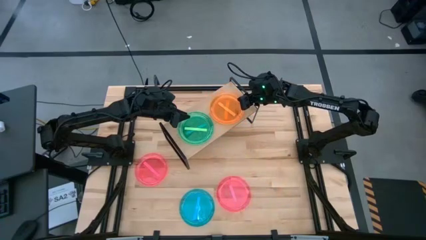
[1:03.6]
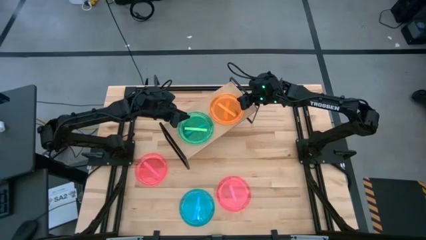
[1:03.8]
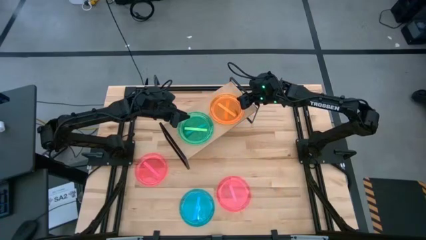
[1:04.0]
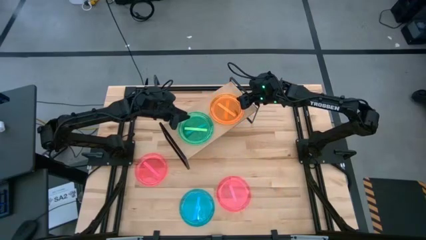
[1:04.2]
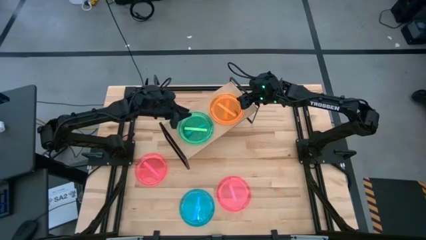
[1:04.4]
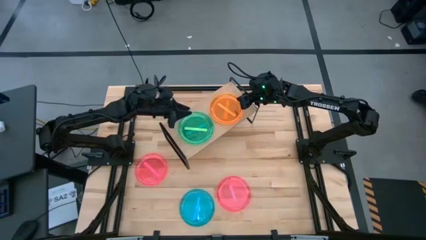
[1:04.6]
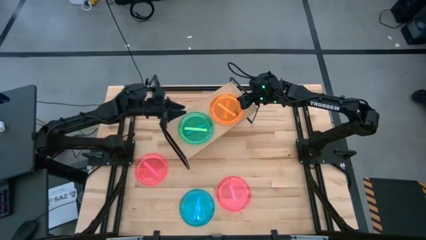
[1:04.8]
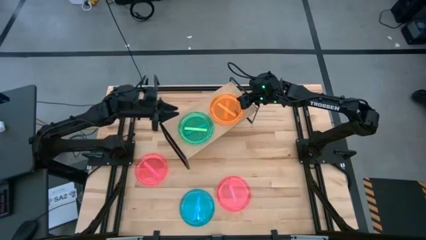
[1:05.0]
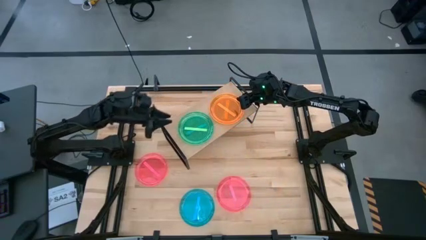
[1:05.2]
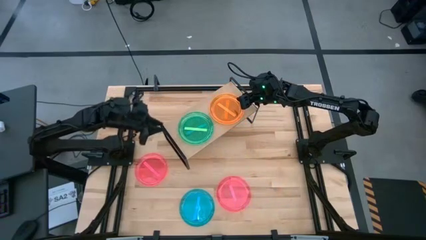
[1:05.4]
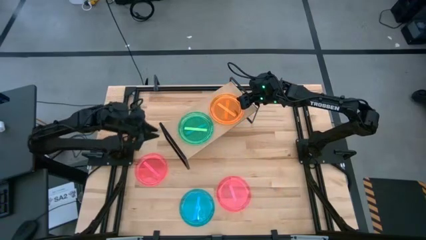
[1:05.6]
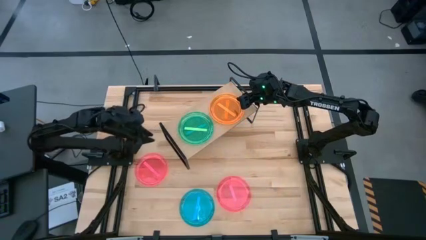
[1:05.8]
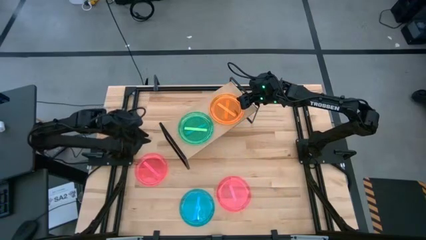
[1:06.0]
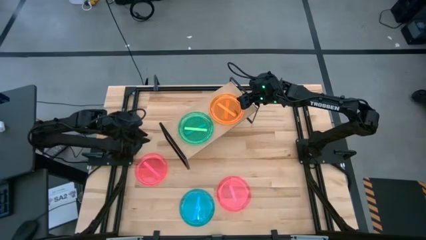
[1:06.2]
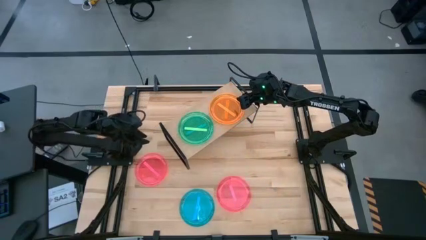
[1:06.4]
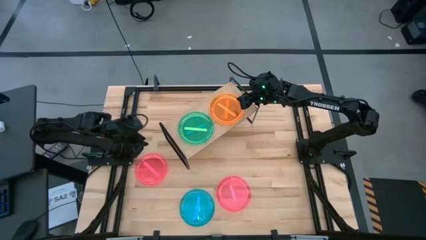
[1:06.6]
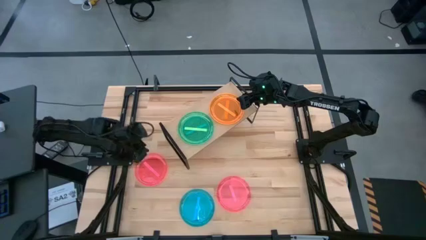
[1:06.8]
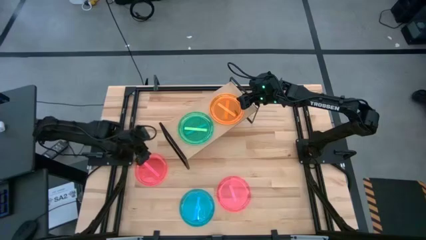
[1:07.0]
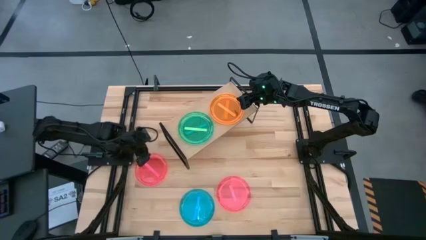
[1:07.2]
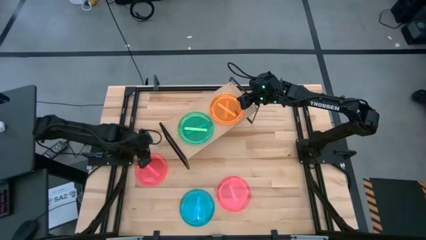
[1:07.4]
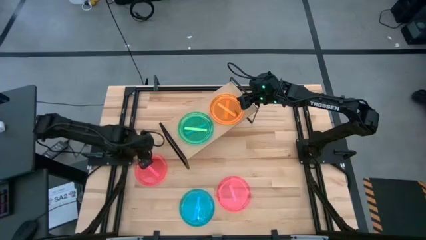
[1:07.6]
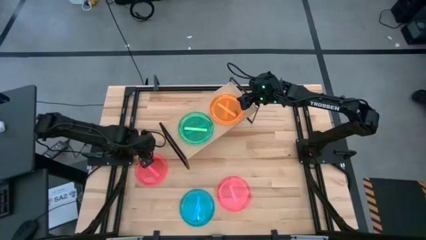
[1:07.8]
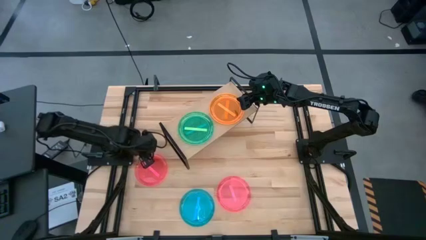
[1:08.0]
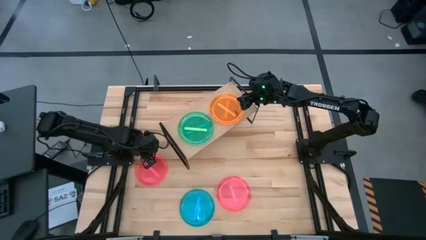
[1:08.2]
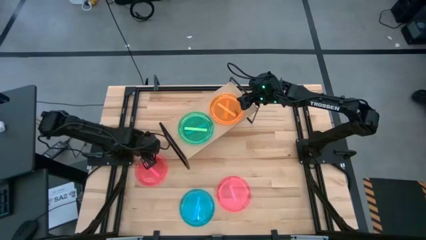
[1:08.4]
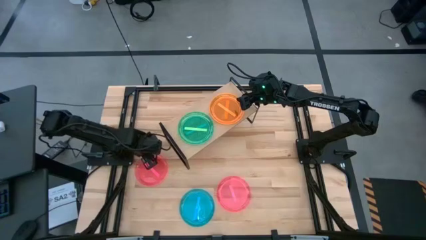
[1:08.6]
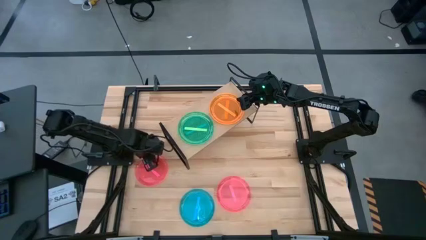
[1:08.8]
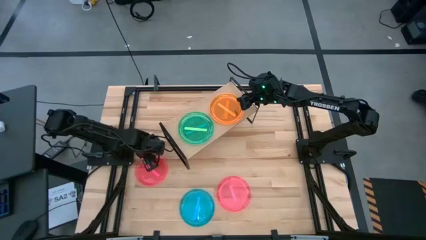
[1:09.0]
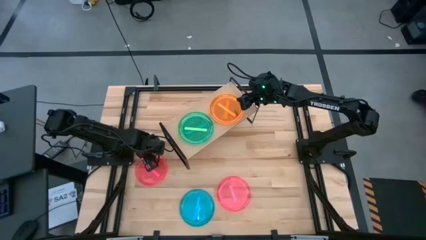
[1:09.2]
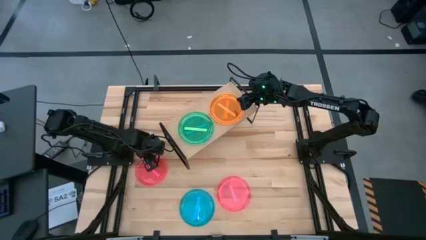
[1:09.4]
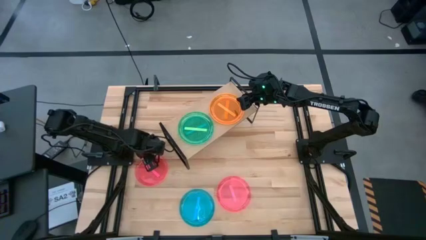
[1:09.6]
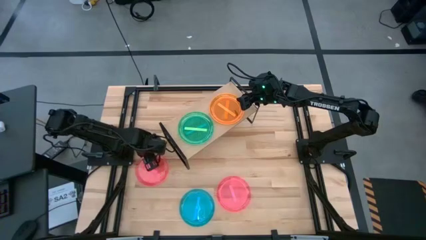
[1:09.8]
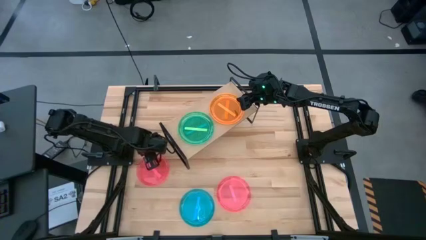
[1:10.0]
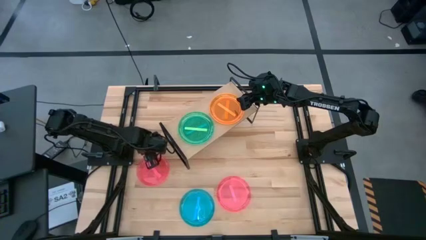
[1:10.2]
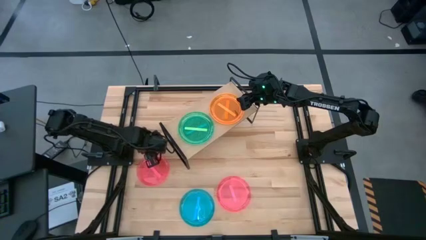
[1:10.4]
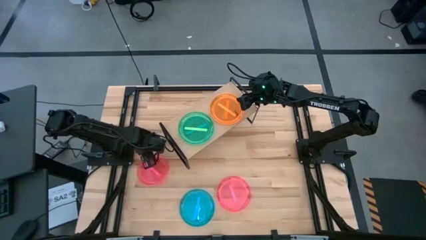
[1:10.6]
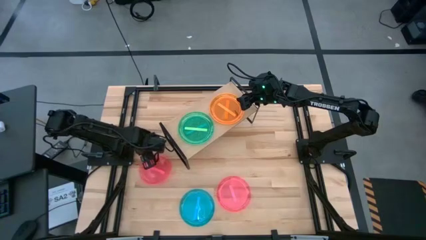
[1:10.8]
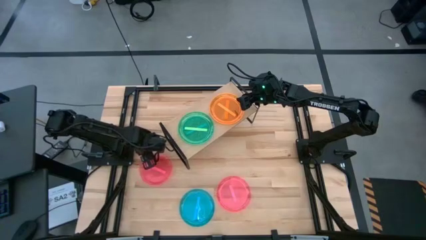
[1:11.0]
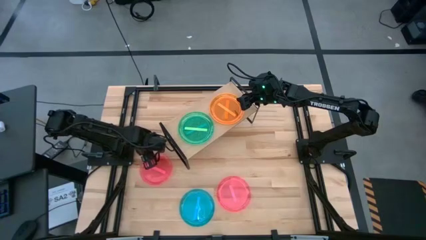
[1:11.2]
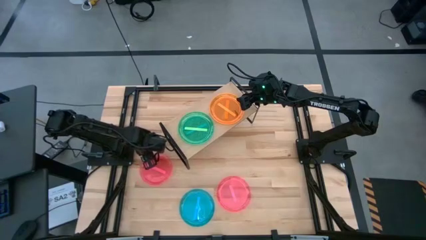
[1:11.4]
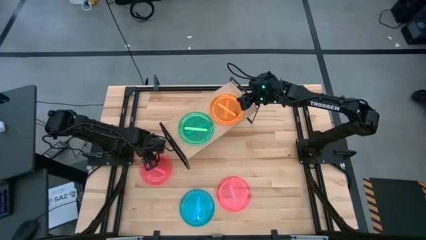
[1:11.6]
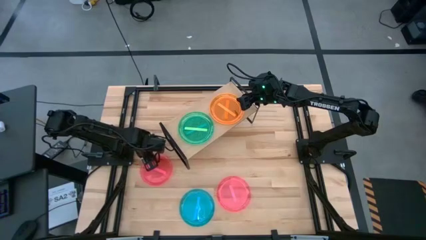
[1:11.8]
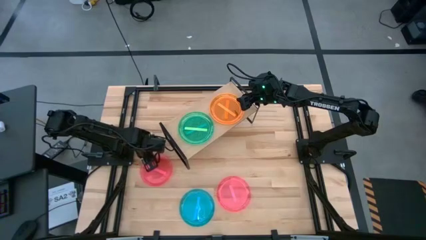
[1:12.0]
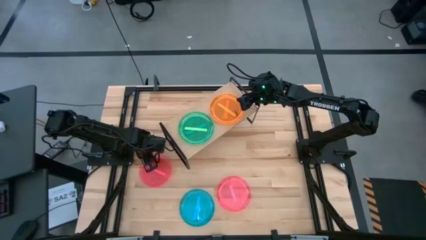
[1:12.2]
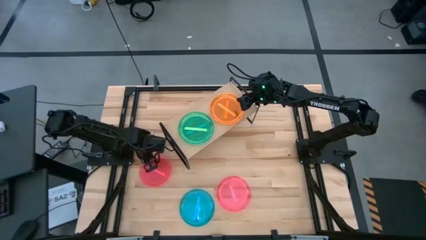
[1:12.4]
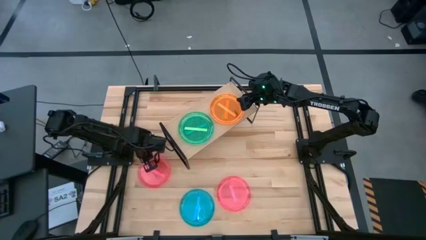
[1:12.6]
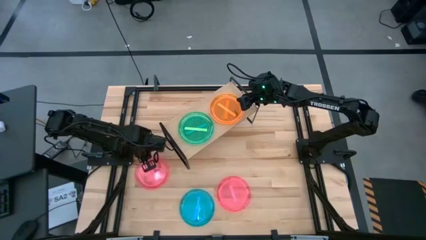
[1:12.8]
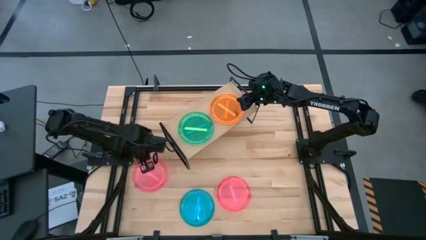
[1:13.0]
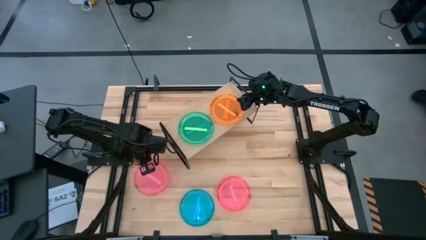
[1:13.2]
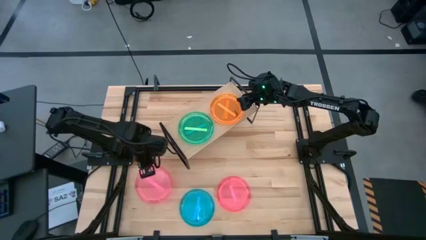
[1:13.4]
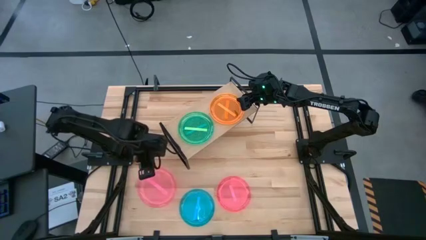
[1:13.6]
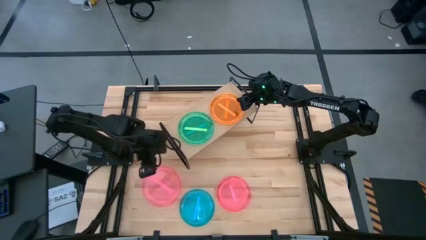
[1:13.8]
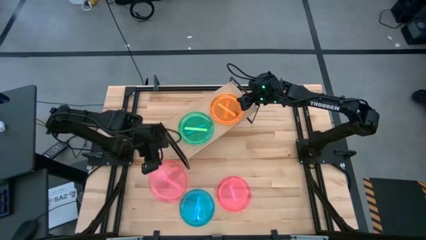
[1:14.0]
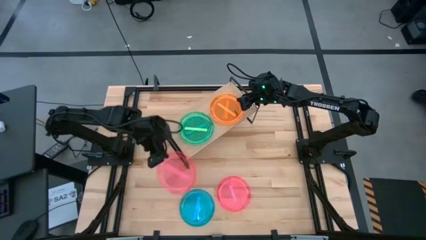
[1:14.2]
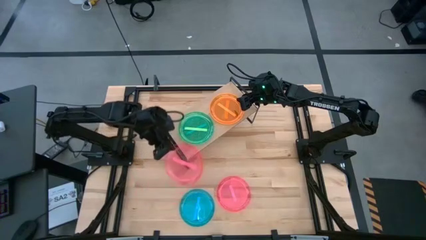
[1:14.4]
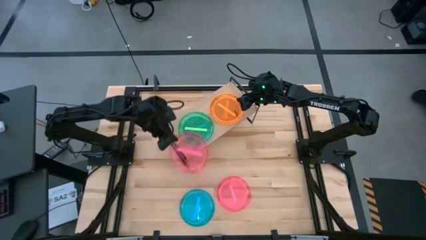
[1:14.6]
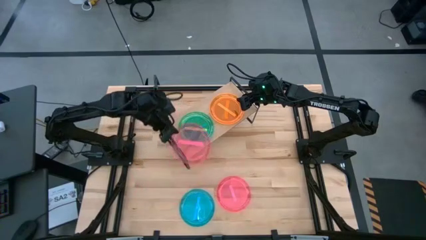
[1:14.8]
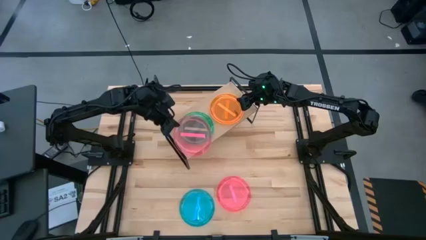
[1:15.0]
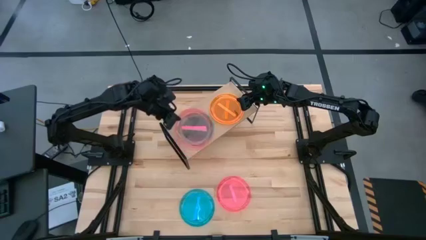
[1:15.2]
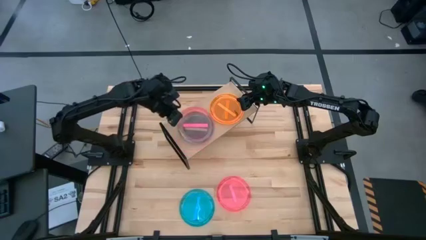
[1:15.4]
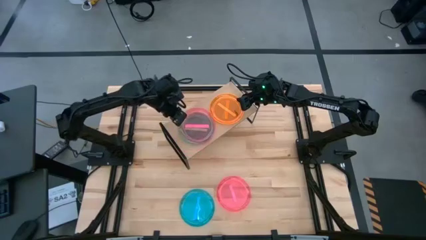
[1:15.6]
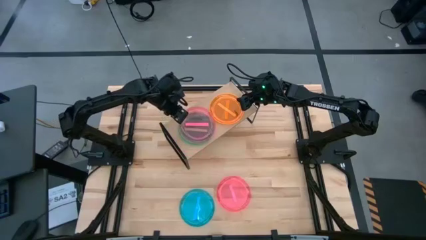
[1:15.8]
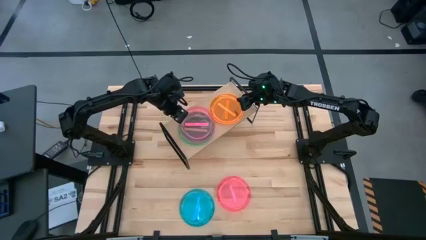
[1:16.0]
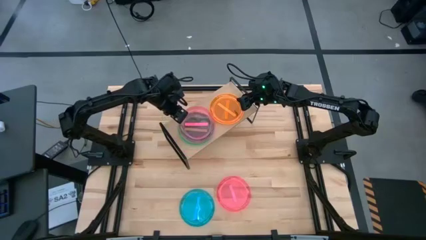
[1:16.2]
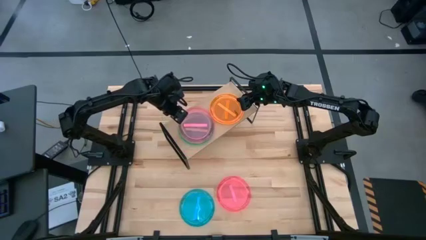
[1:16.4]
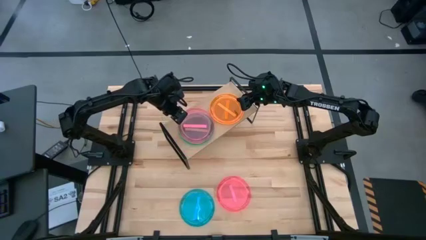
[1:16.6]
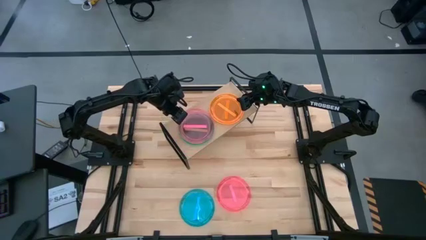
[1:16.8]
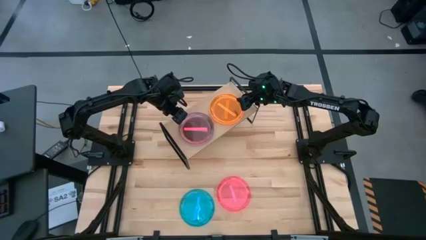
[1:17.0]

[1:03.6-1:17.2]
Task: Place and stack plates onto a shelf
Stack the left pink plate on the green plate on the shelf
